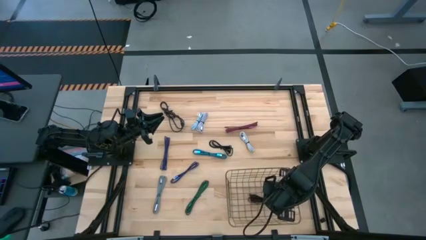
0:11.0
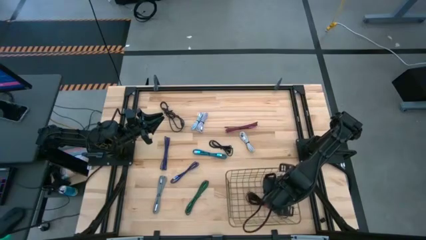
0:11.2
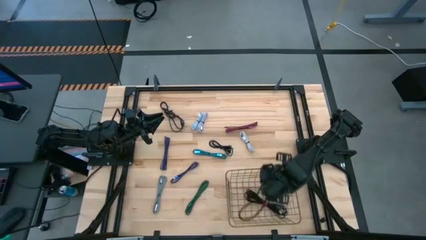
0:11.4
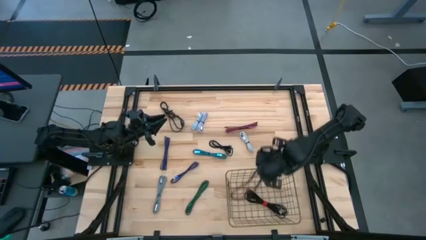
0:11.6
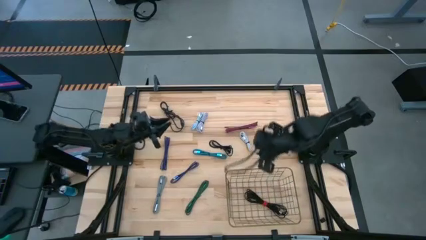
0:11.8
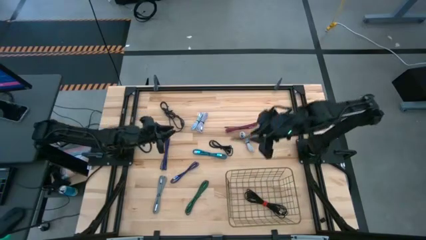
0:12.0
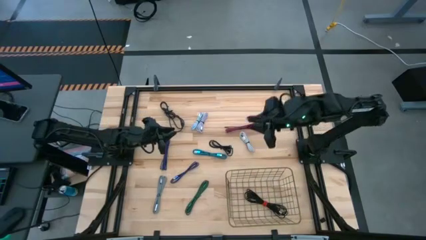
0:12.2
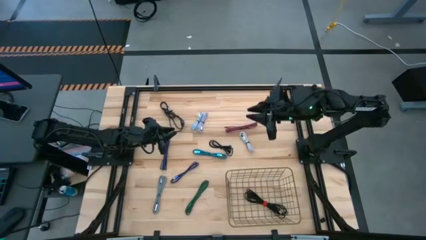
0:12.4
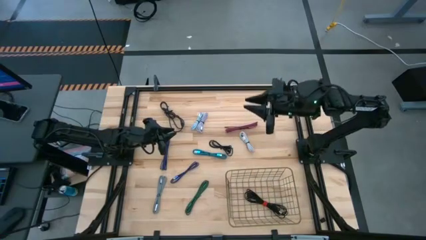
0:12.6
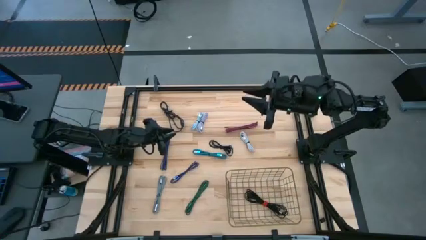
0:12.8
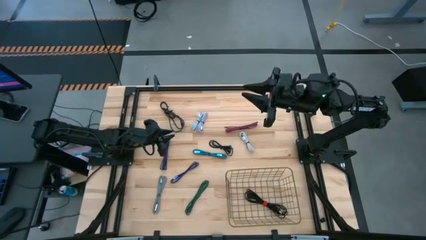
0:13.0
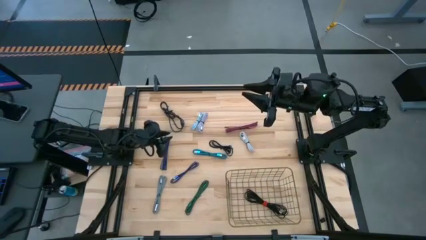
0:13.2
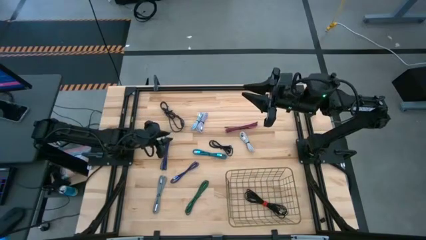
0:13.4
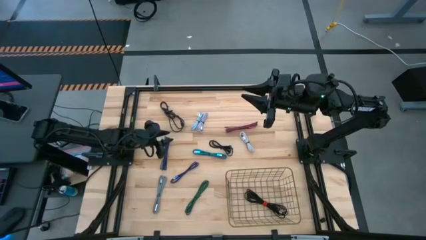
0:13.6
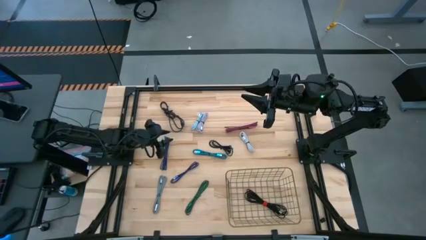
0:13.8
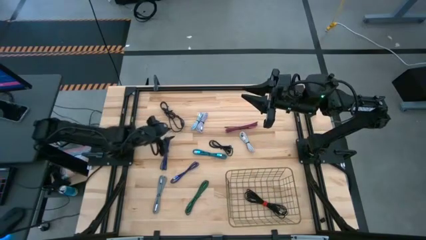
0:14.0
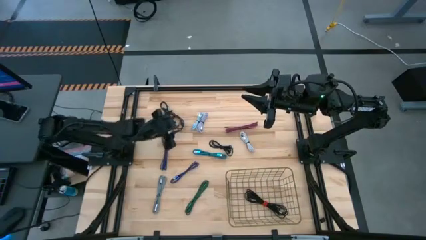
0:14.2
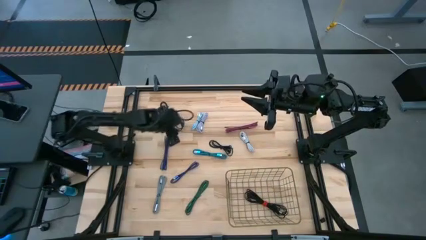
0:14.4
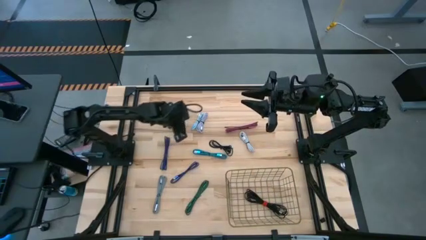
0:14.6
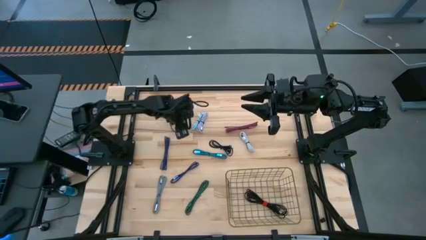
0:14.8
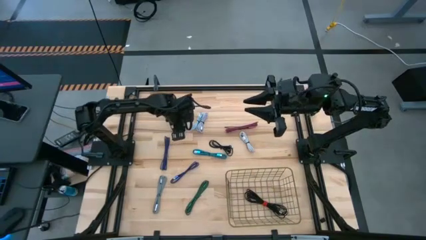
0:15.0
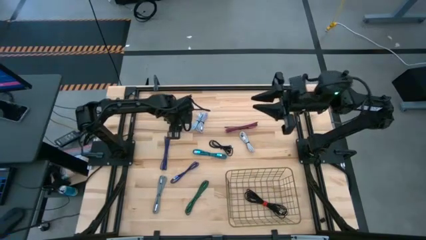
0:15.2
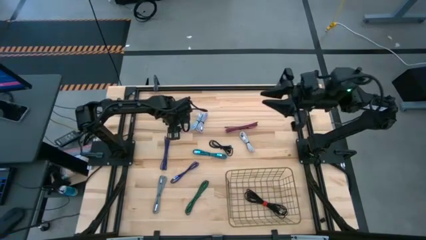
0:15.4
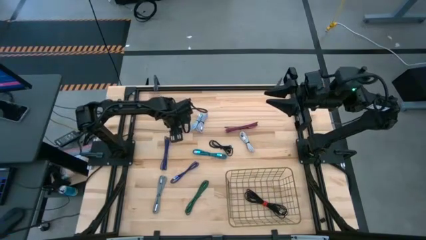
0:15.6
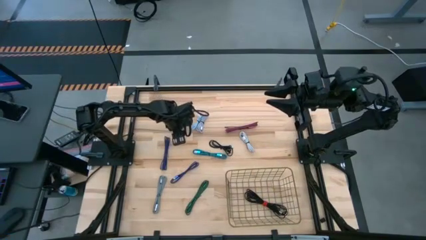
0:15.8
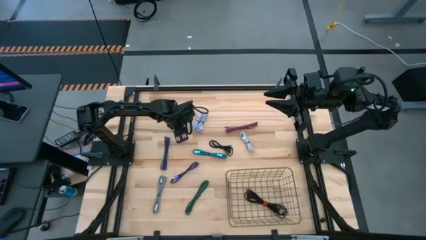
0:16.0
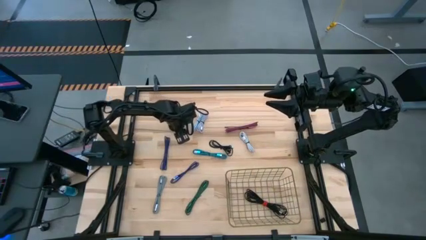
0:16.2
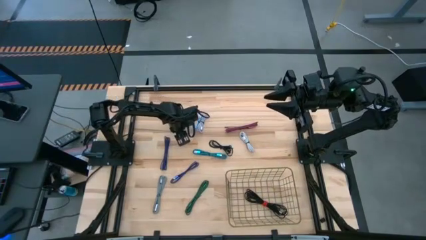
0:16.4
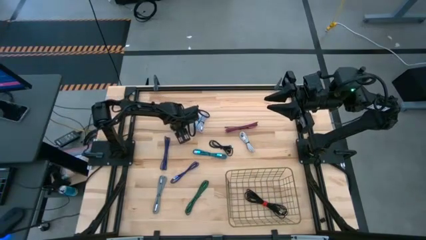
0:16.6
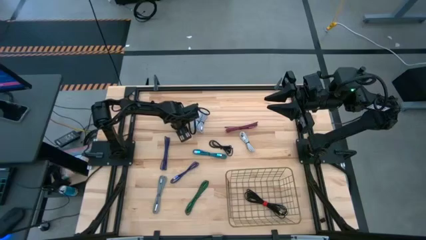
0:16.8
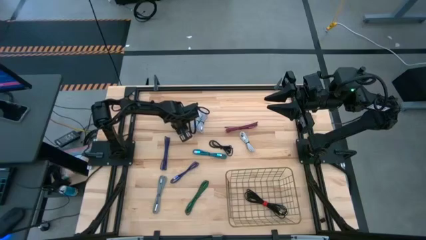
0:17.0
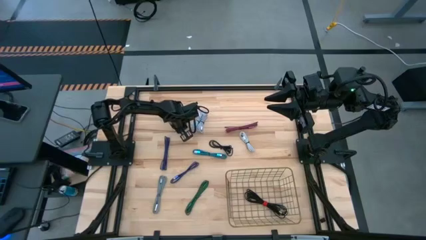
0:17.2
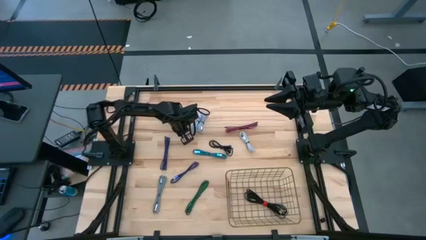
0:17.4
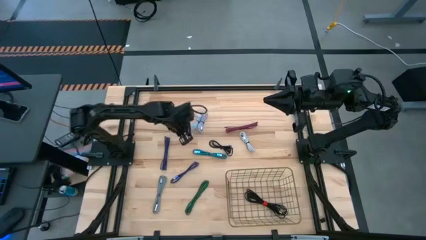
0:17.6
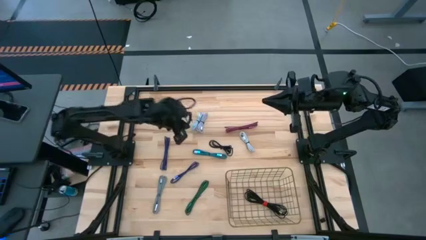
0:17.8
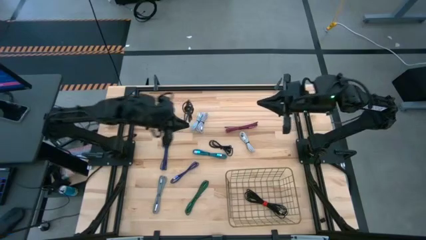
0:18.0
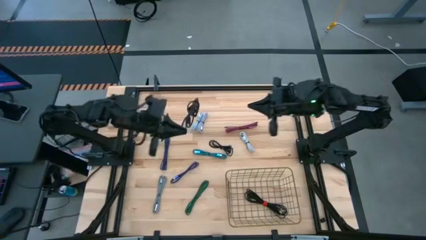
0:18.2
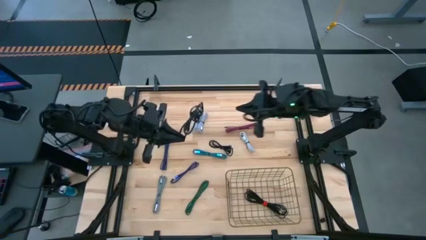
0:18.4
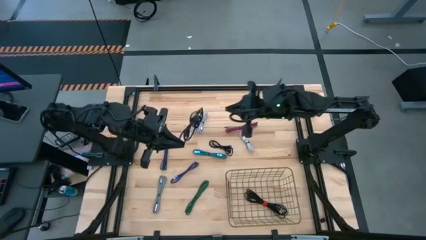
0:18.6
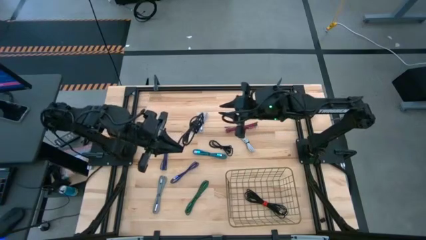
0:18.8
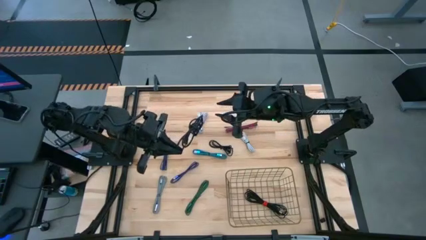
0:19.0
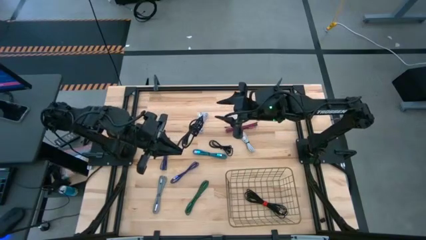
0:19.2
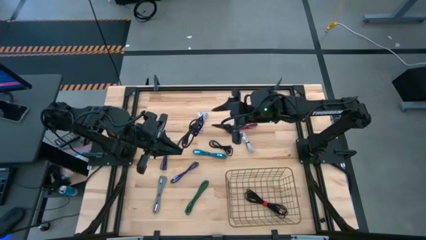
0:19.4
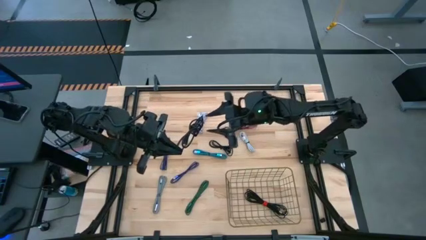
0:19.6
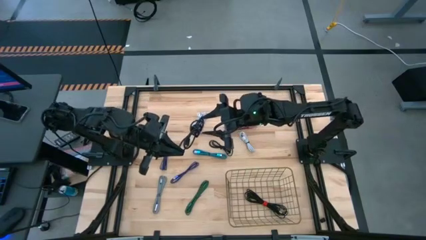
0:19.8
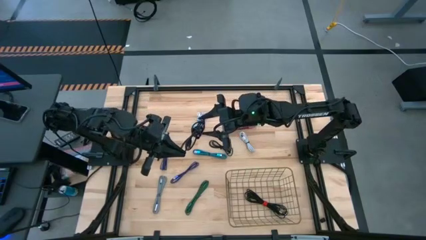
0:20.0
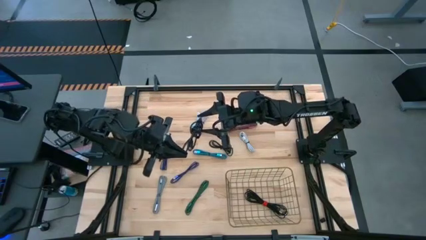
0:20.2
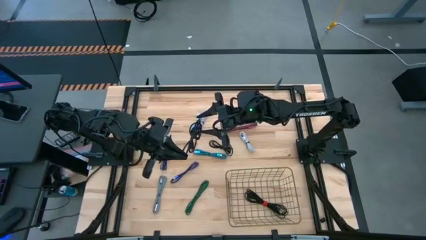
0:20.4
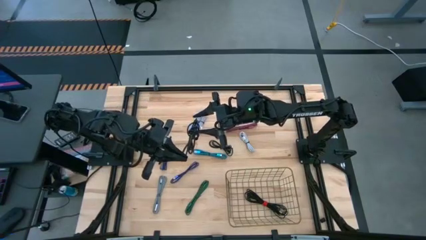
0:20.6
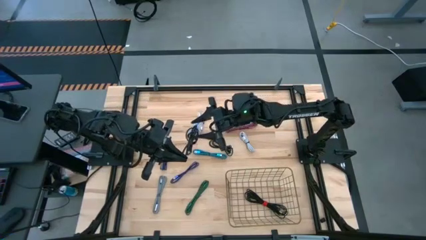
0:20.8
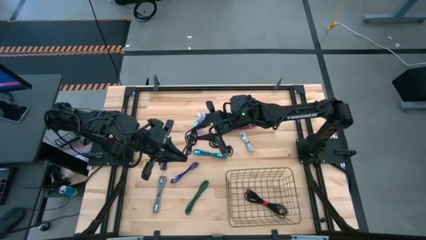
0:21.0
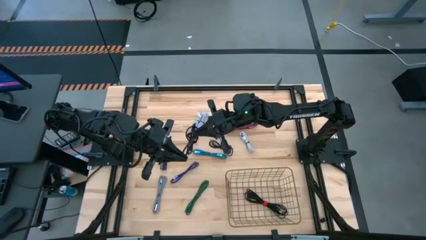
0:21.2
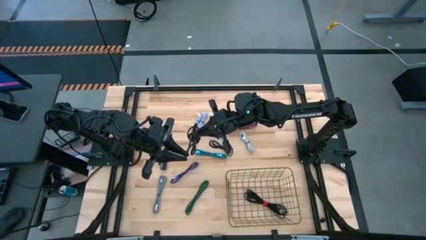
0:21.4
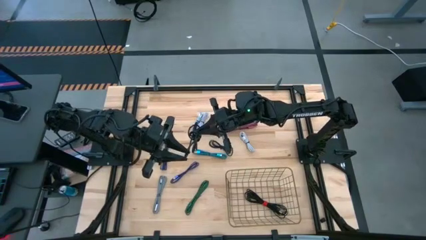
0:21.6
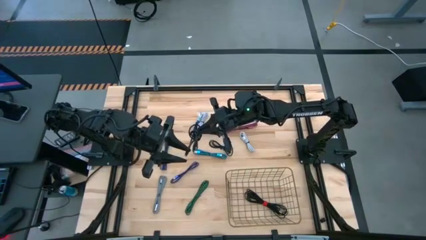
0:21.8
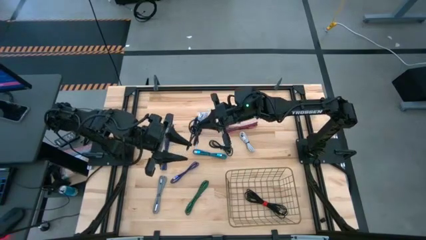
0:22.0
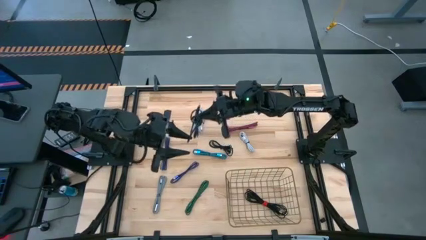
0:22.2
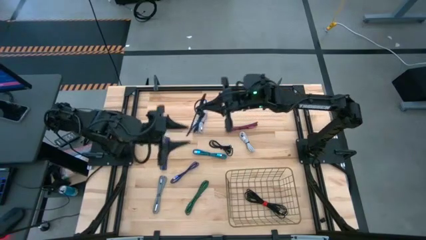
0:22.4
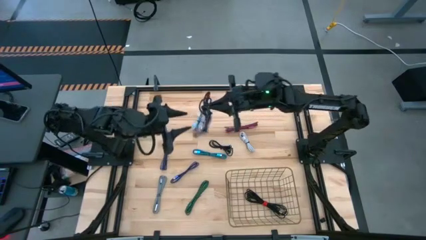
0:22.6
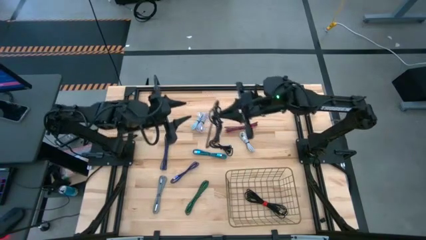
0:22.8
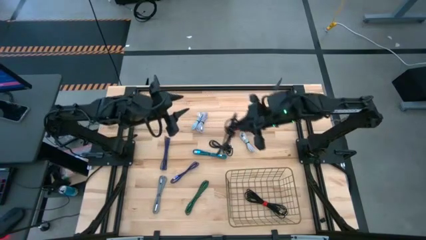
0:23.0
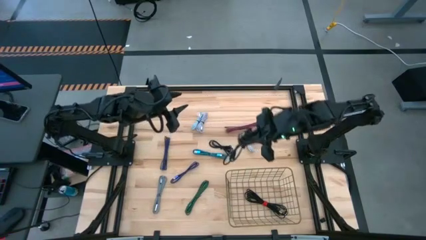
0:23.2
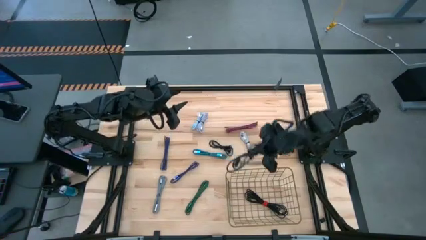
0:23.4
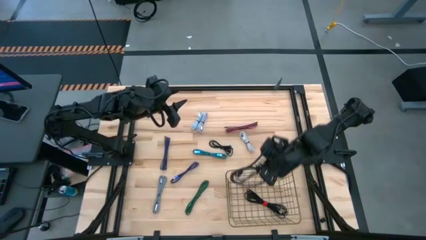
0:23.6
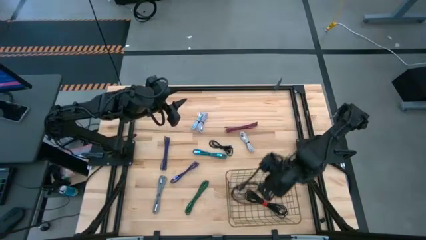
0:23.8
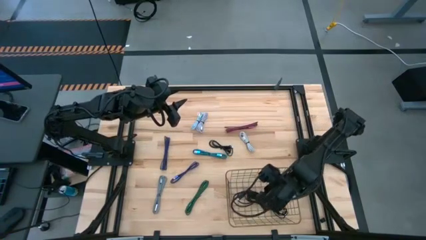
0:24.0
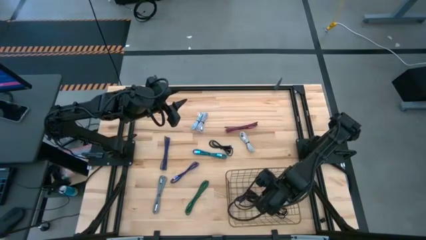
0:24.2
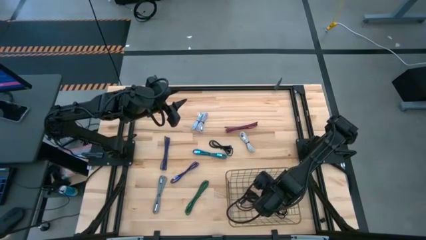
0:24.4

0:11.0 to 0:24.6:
Task: Pick and place USB-C Cables
Put the top black charger cable into the wire basket
